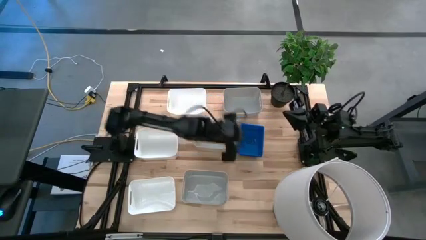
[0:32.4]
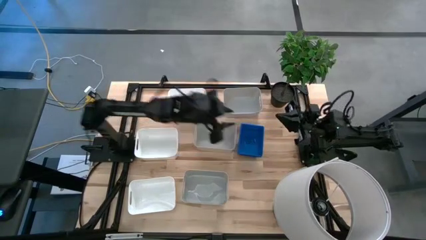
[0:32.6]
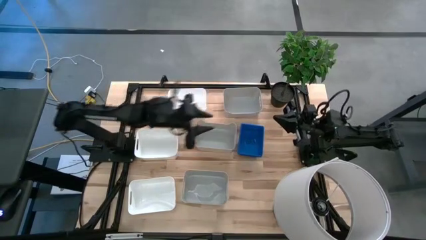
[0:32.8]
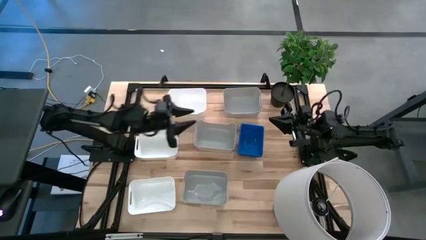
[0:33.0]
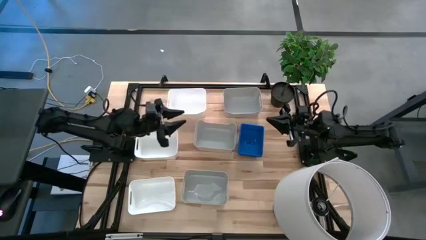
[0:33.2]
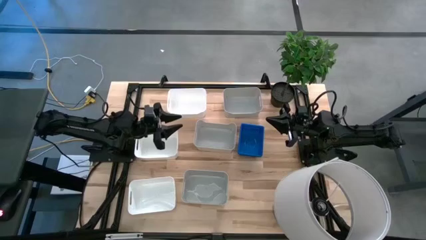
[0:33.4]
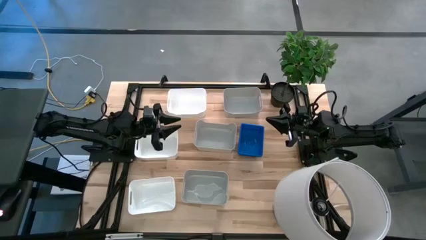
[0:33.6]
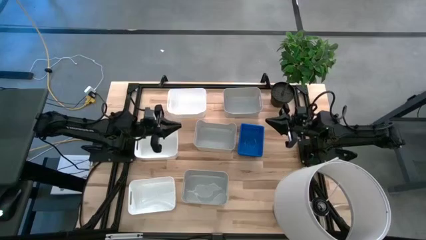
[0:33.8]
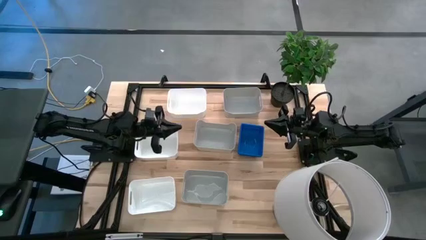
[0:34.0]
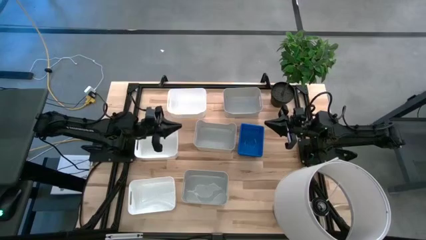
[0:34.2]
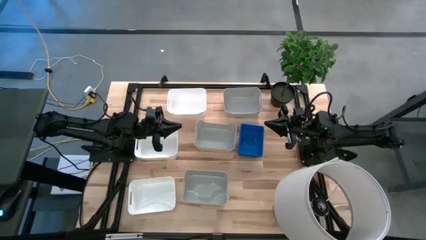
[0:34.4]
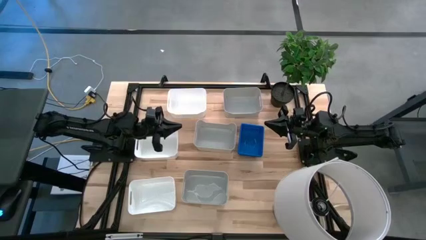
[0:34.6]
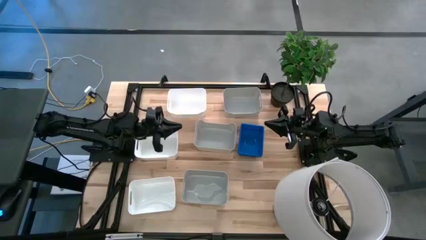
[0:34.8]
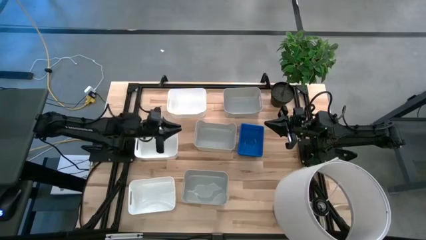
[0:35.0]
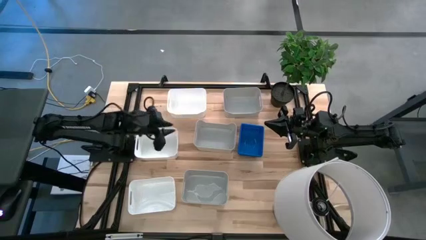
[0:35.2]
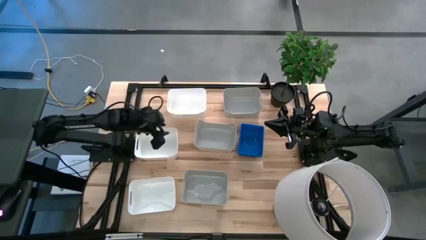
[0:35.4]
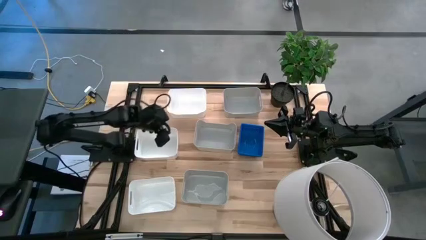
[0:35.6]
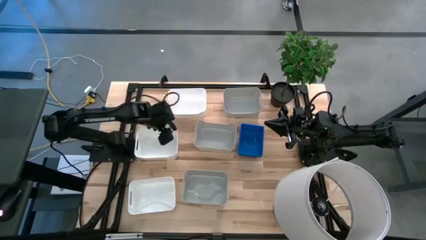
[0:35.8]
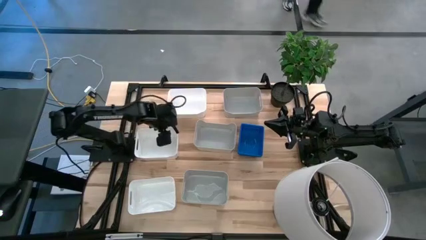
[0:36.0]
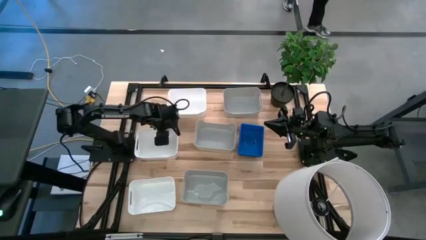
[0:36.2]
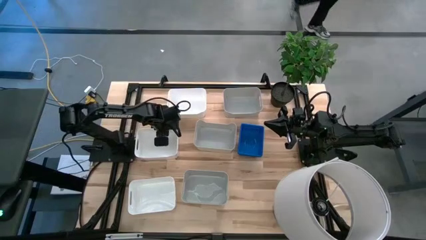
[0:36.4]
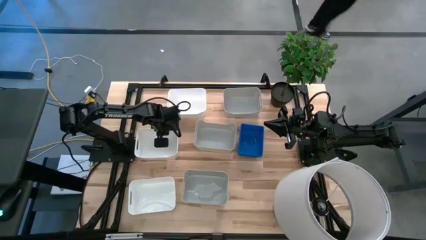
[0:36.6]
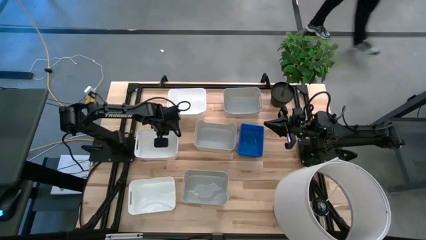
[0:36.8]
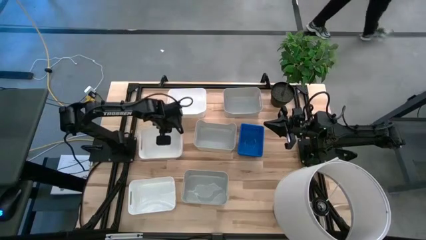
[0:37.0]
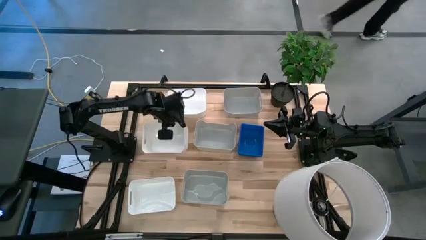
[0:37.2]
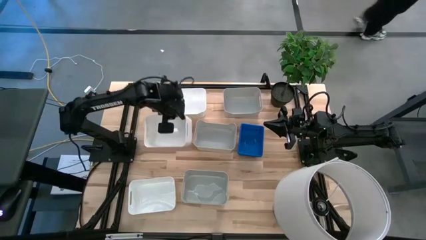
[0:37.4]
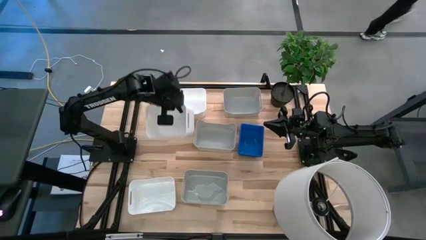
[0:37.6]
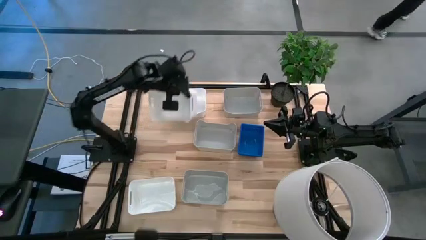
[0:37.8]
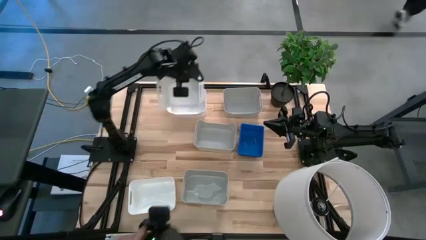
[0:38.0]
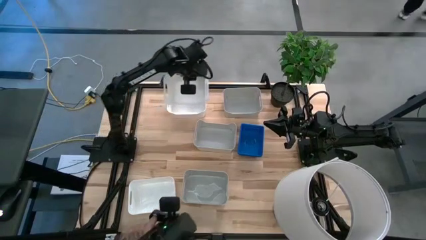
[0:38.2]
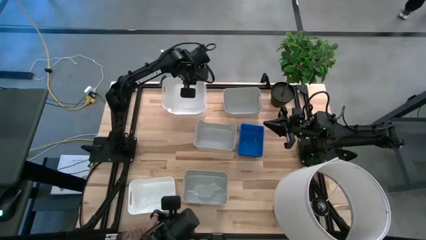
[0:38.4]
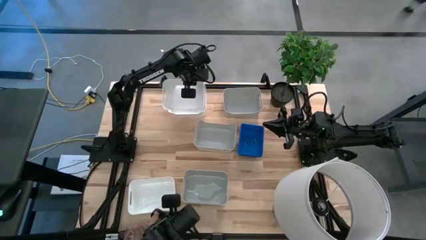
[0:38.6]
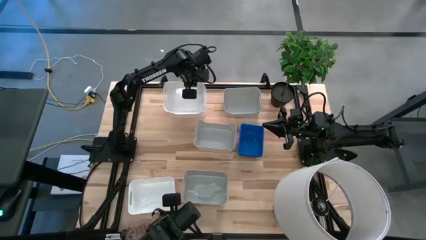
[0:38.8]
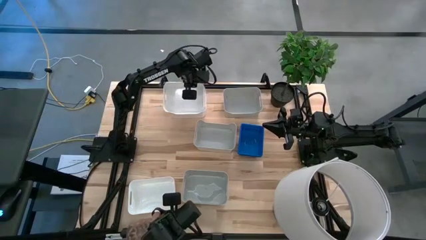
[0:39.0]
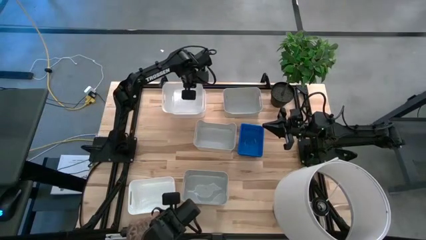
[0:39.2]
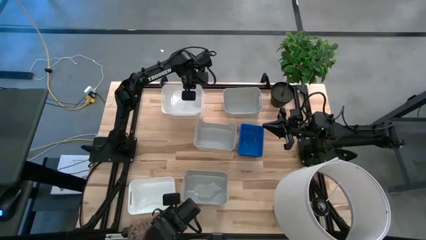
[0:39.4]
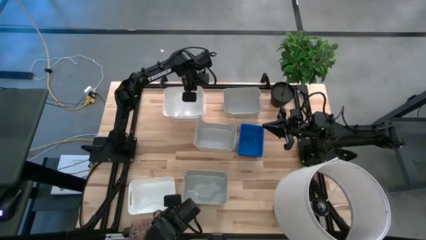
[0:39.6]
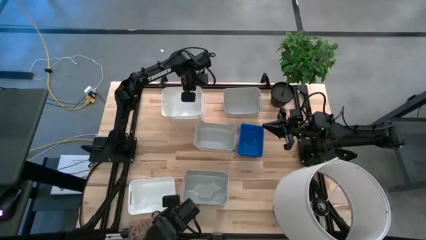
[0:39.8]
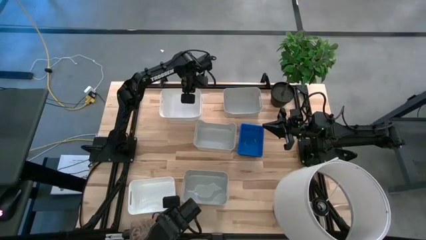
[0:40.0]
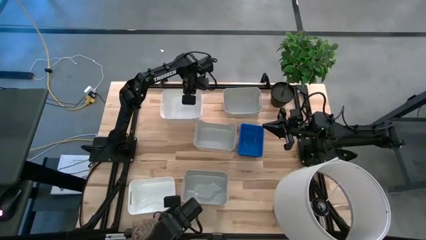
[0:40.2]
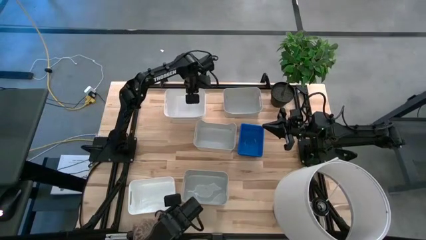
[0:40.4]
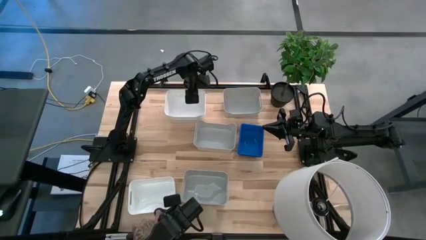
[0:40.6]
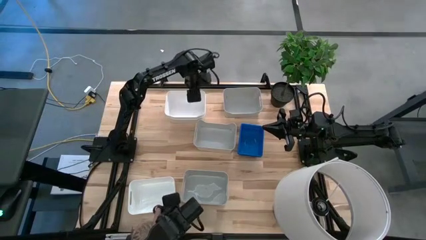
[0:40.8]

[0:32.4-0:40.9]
Stack the left white bin into the upper left white bin

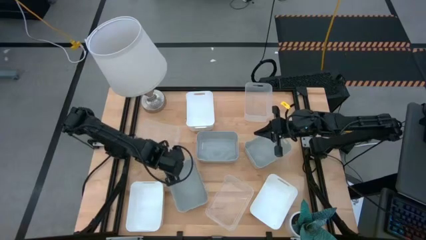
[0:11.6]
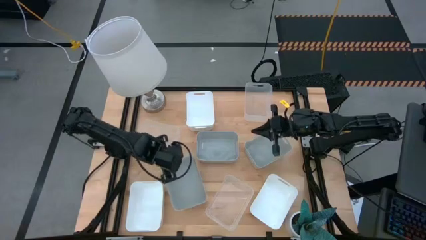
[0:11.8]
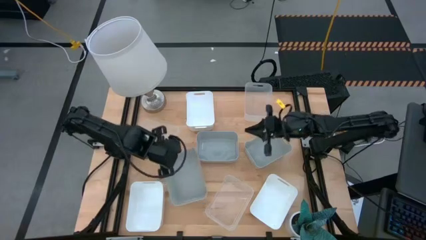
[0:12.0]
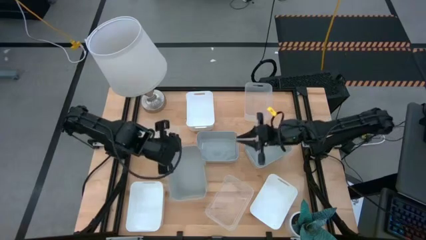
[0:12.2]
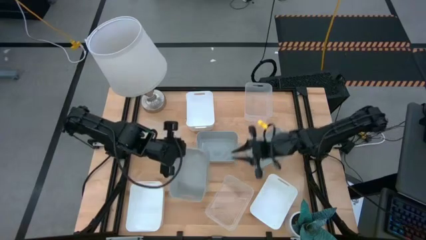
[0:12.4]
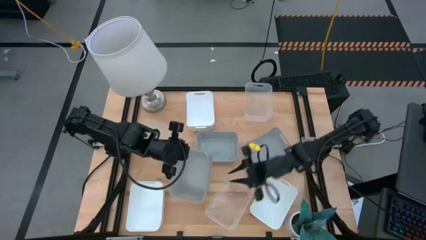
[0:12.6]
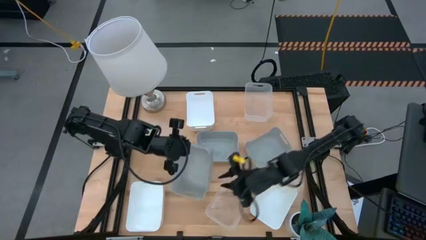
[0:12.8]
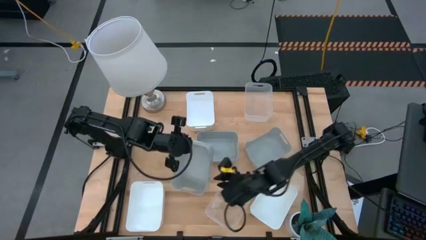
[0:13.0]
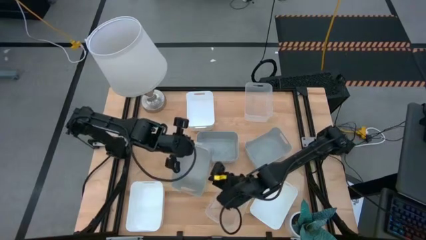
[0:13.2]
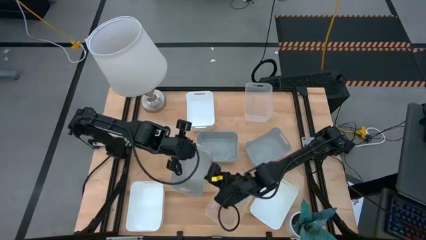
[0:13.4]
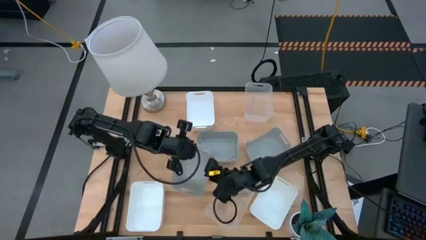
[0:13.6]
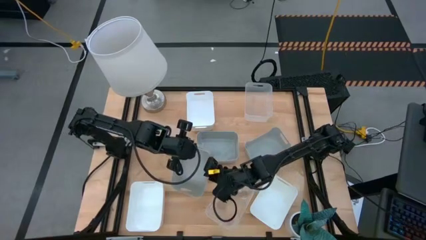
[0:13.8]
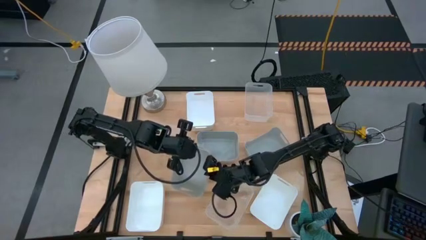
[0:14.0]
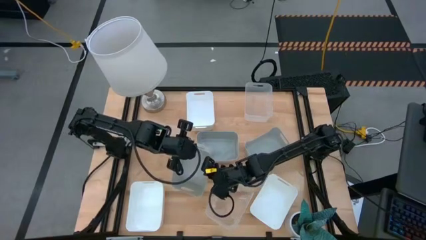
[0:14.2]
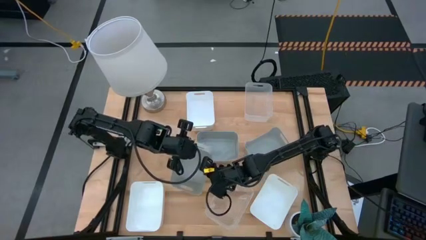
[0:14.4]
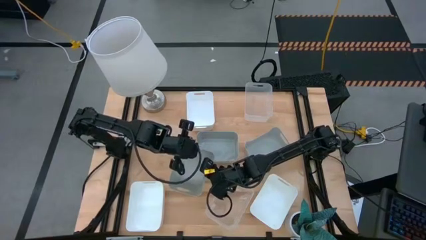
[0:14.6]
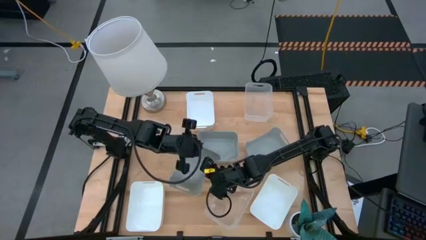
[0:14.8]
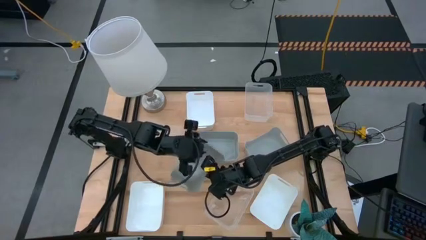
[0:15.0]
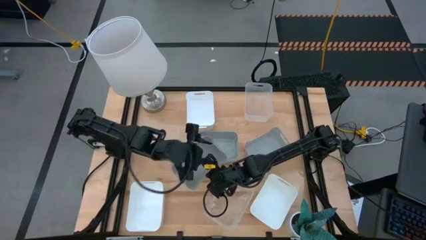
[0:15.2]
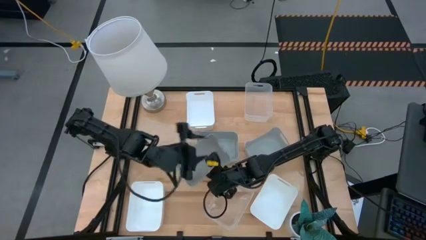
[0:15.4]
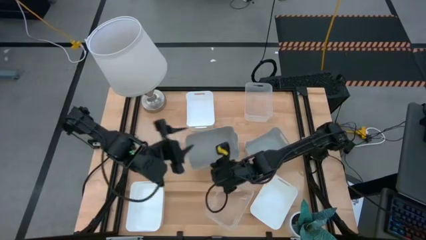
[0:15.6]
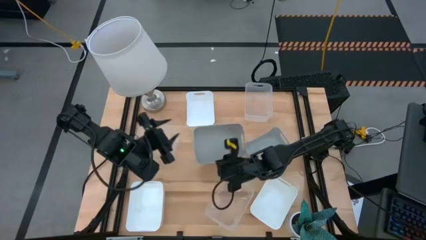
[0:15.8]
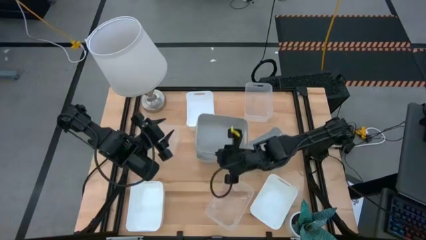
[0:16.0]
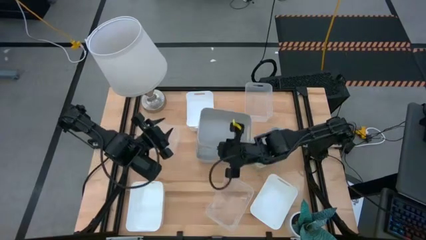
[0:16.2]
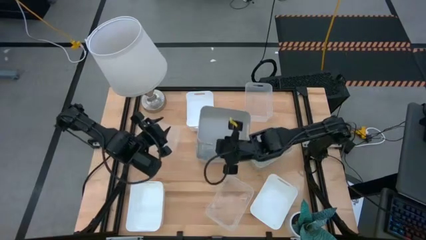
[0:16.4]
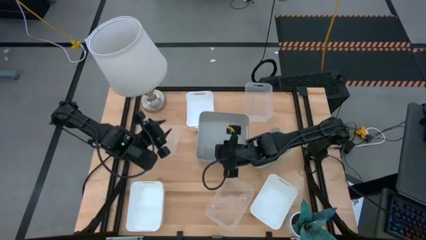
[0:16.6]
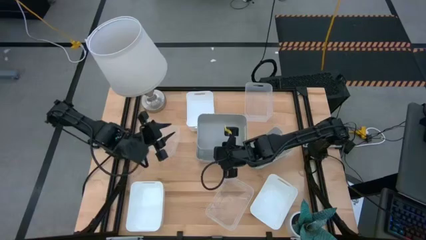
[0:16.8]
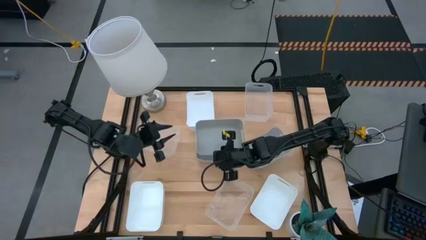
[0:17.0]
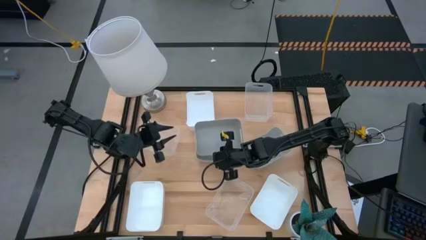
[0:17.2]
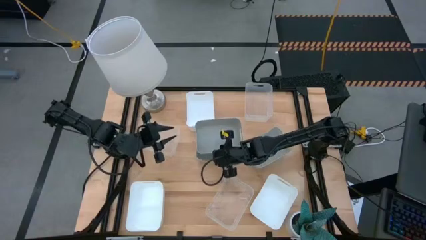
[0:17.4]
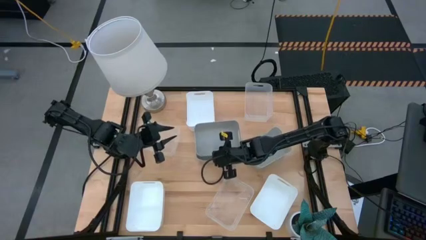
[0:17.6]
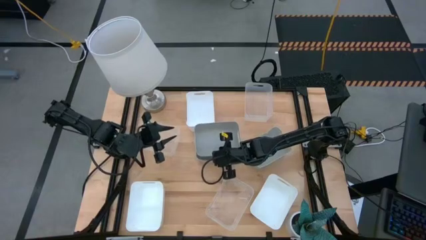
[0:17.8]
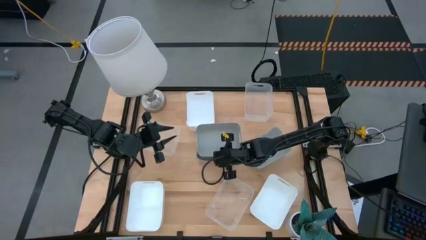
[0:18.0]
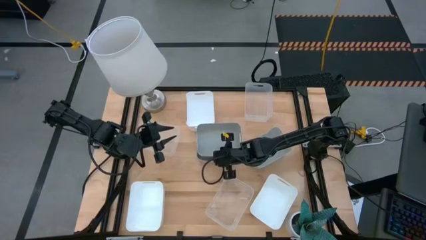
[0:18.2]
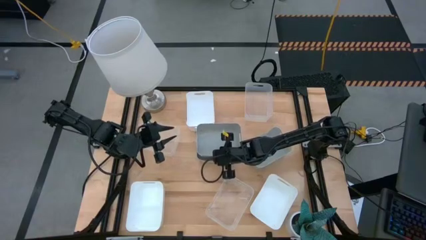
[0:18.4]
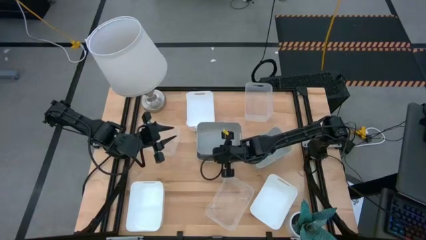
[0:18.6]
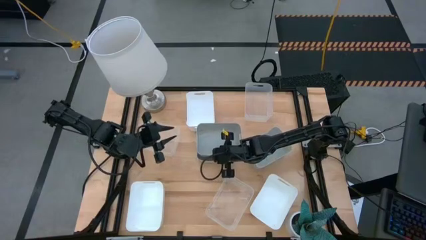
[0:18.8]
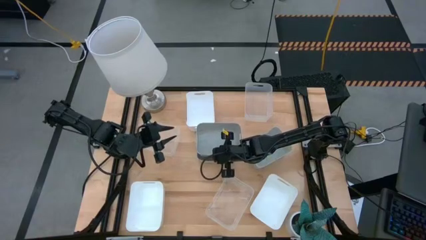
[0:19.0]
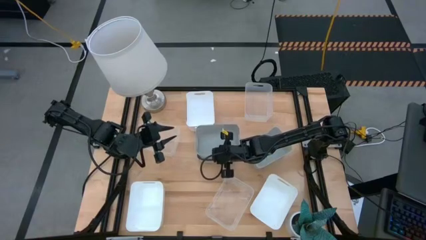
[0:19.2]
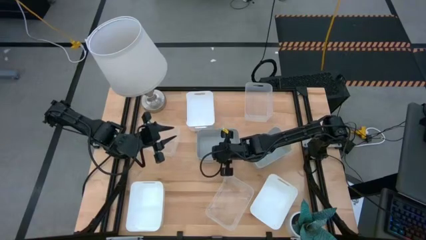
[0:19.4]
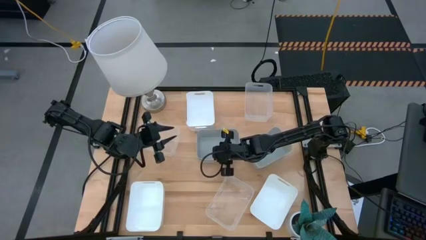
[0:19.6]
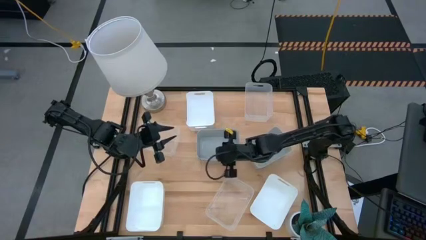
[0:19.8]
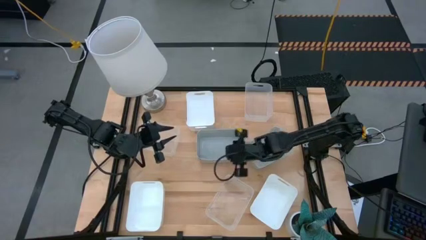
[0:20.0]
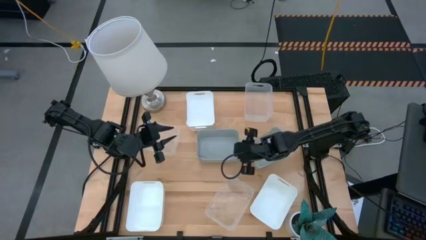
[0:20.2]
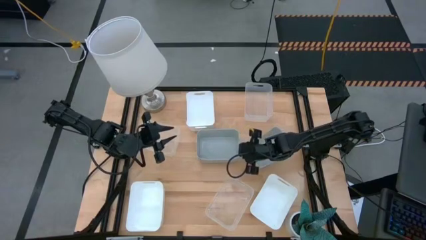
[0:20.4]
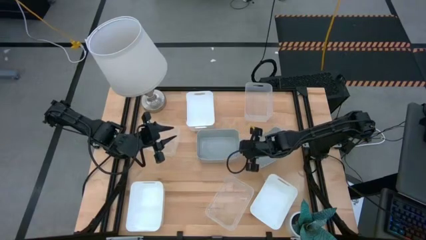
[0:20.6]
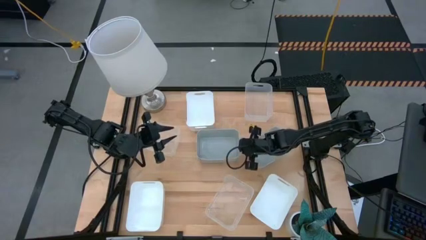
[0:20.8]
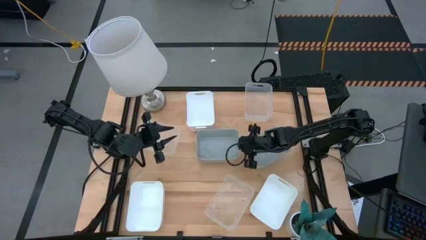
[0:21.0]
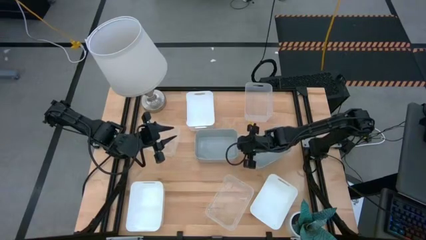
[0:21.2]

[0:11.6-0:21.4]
Stack the bottom gray bin on the middle gray bin
